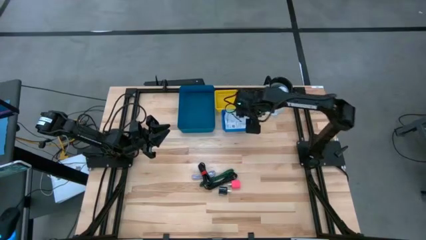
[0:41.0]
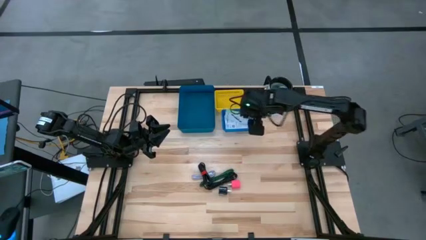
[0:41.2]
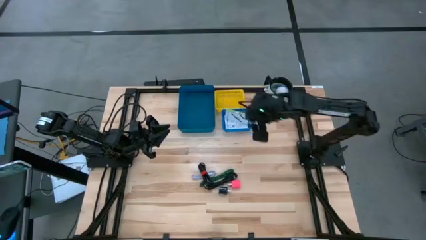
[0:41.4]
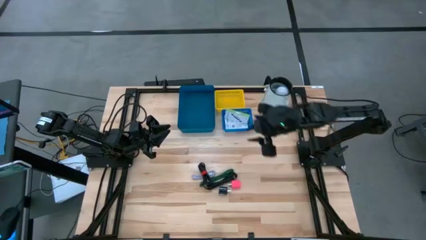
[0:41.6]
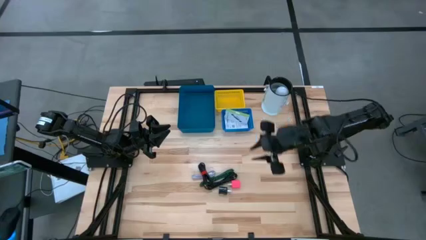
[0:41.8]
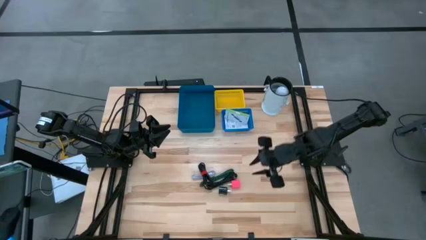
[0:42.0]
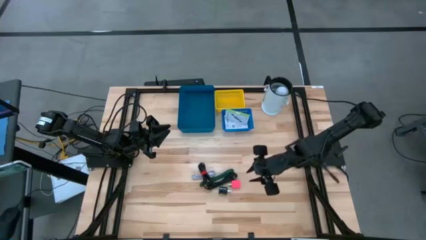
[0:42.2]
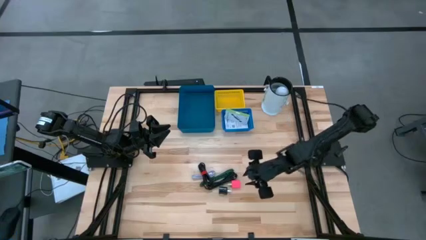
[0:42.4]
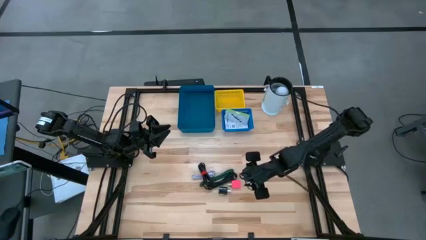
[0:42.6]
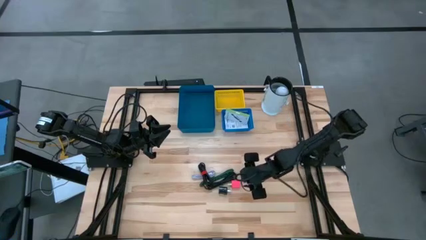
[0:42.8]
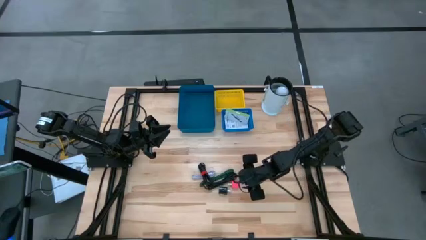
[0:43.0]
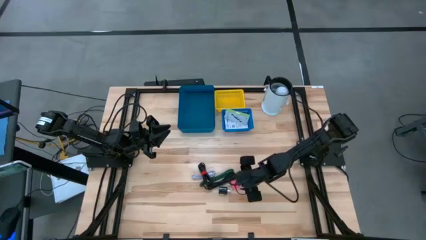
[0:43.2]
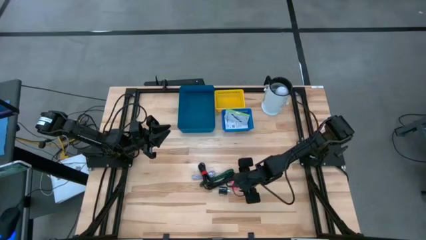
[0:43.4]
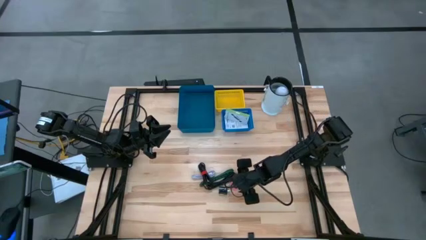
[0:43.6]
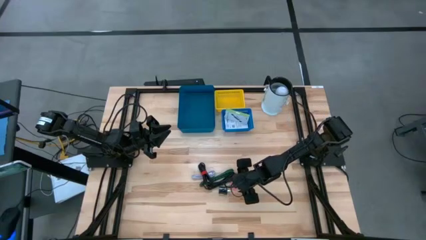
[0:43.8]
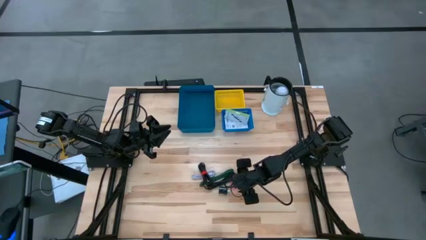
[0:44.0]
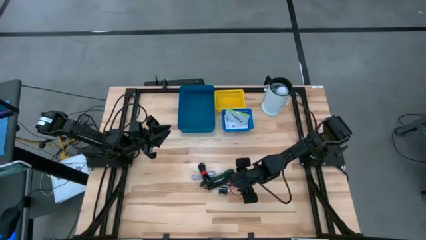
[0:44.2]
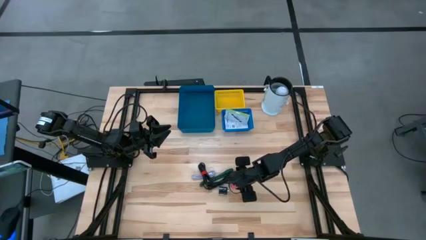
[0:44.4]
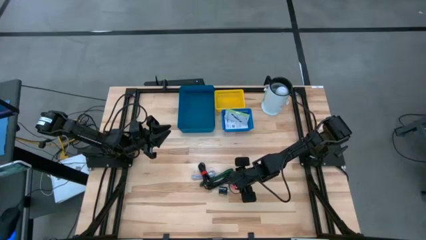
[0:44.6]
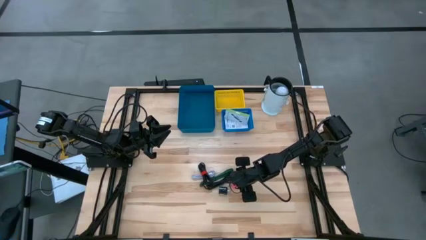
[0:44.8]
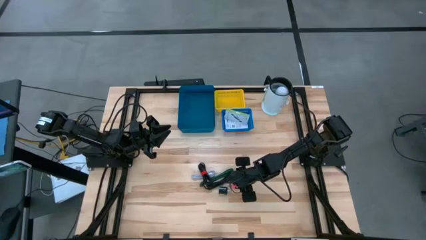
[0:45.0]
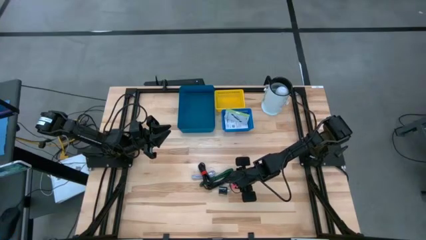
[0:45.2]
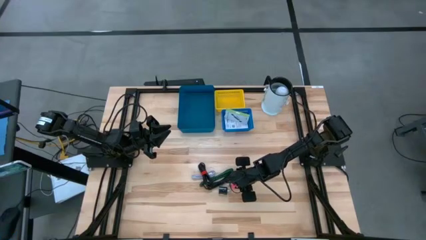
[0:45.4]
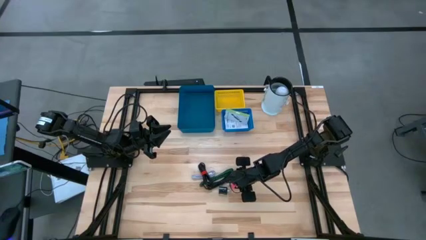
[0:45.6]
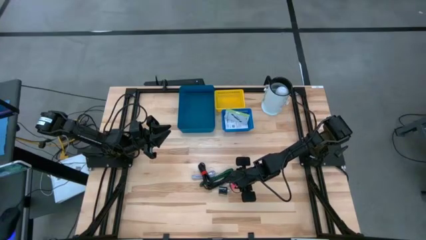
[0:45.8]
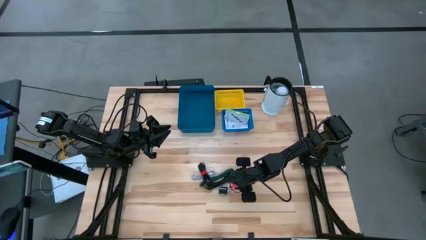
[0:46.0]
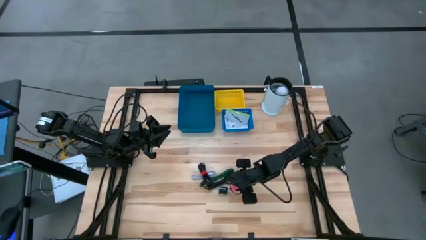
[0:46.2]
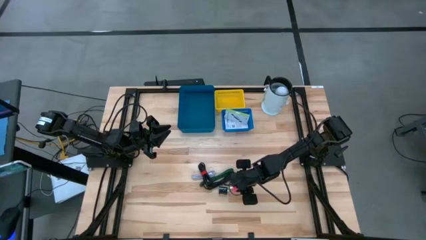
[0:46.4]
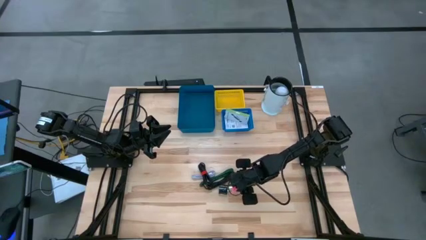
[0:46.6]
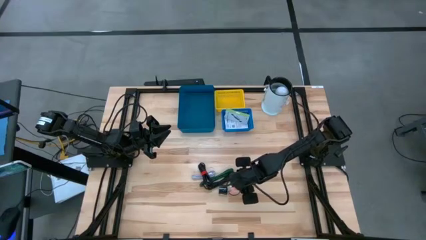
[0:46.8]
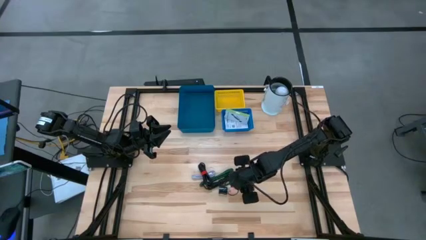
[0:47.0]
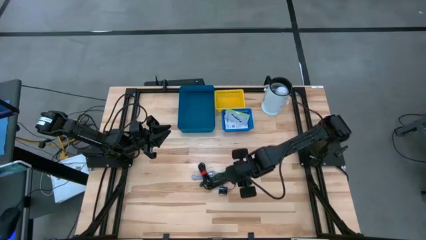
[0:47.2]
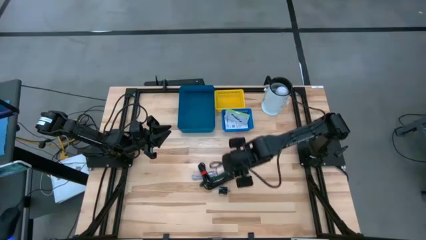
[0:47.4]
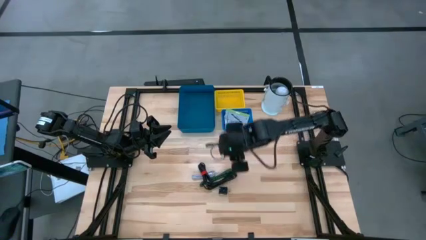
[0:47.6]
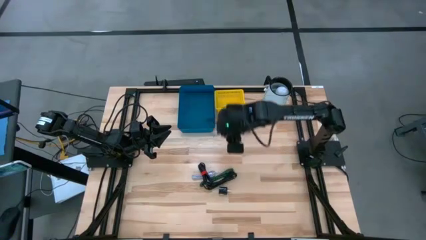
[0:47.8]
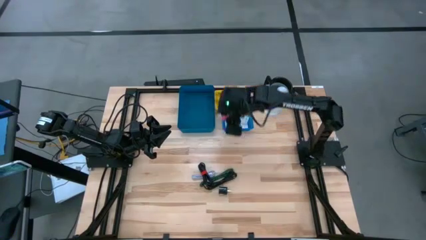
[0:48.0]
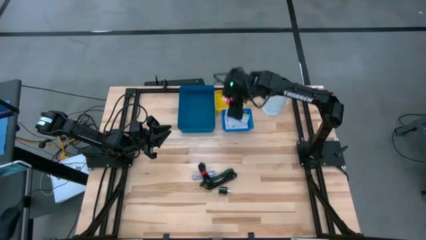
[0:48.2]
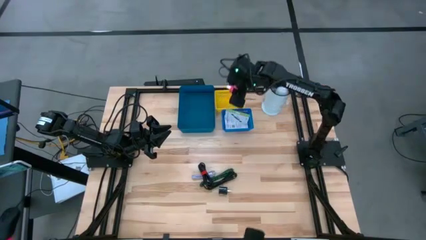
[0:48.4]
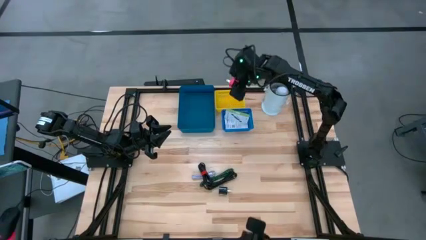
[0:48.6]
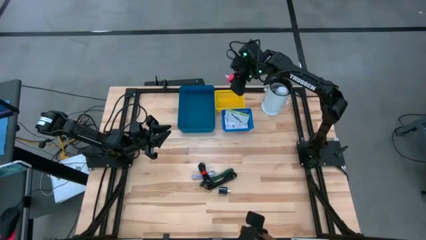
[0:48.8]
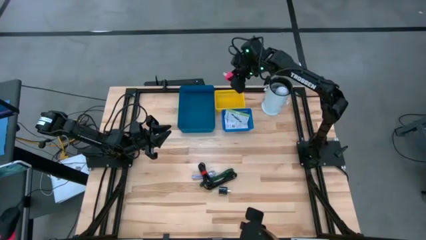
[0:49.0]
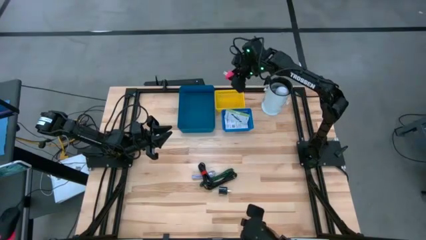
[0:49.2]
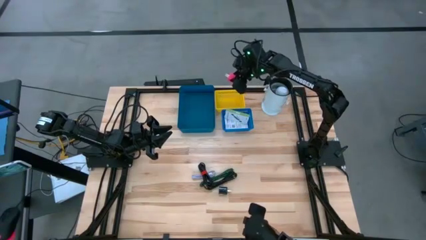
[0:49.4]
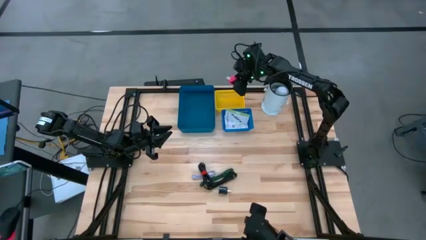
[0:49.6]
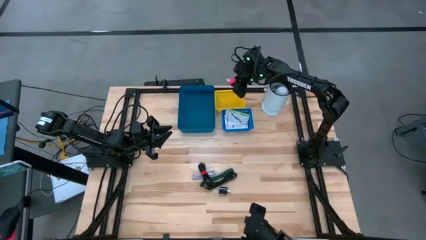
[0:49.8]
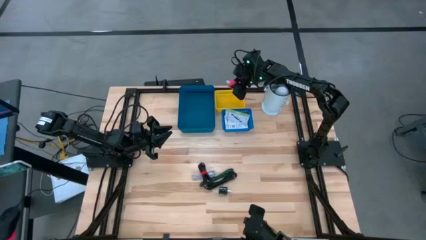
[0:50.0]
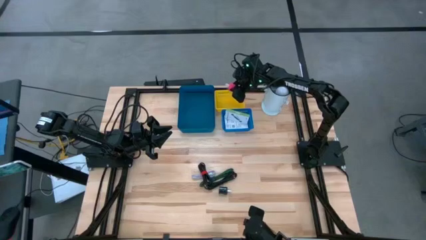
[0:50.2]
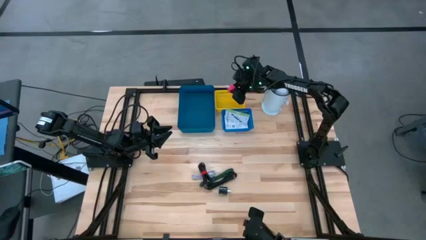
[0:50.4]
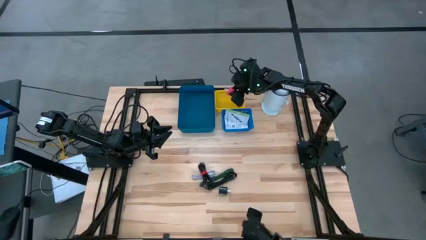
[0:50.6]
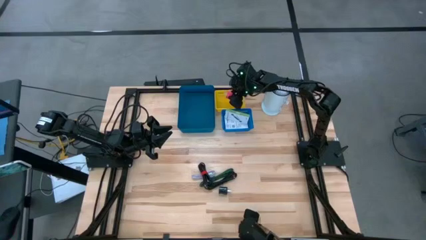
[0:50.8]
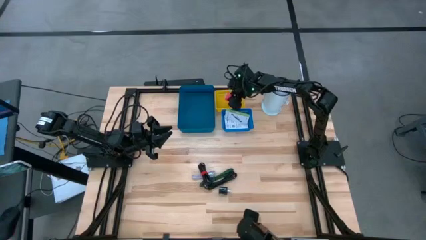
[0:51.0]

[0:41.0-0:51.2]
Task: Pick and place items into bin
Put the pink charger adapter into the yellow bin
